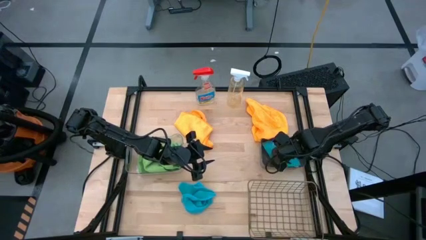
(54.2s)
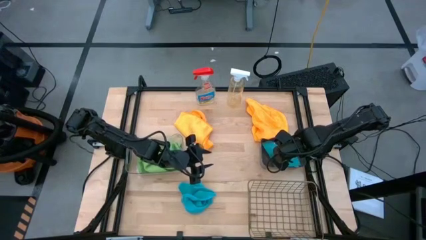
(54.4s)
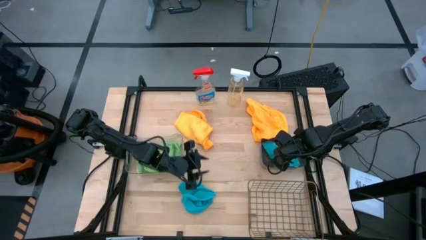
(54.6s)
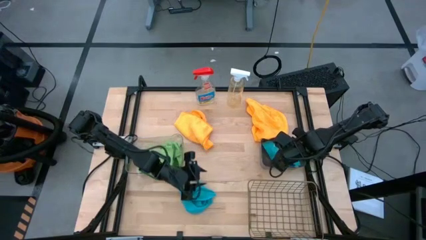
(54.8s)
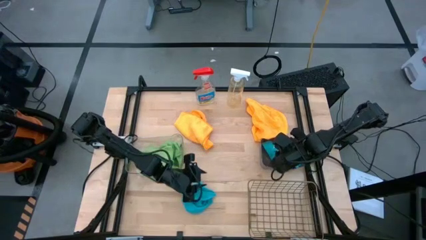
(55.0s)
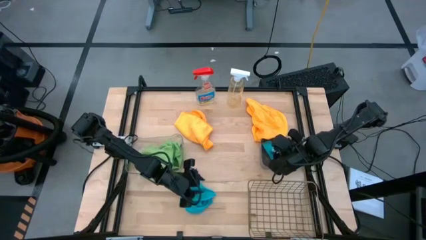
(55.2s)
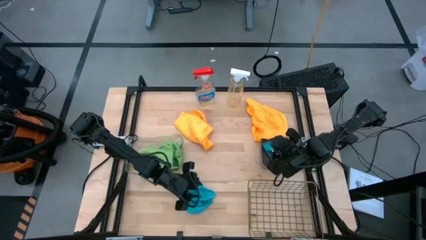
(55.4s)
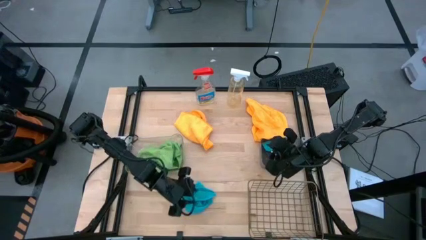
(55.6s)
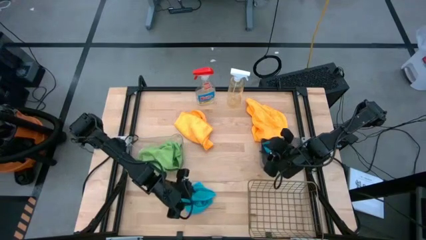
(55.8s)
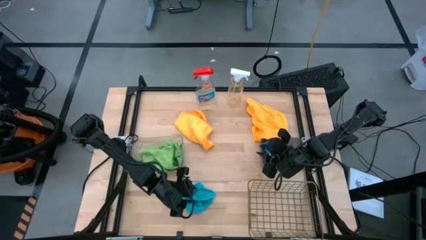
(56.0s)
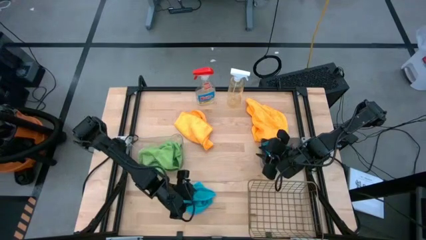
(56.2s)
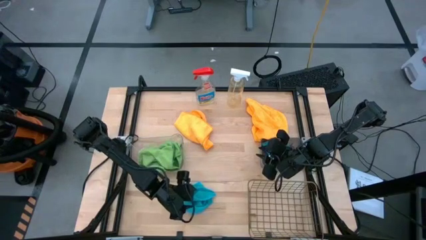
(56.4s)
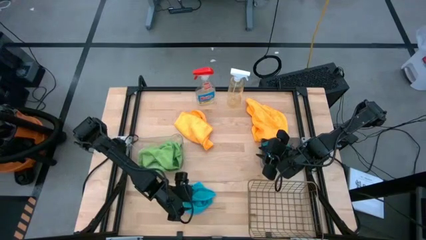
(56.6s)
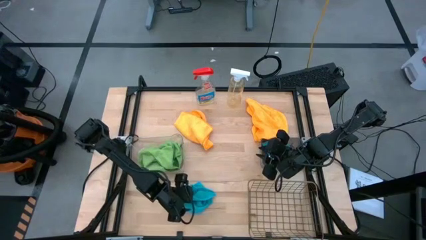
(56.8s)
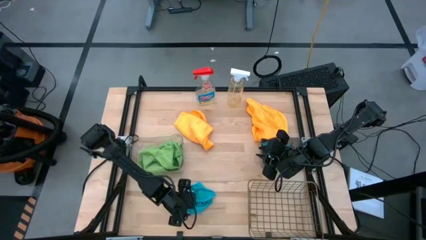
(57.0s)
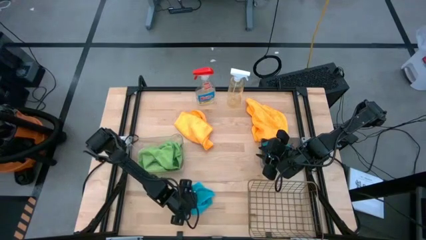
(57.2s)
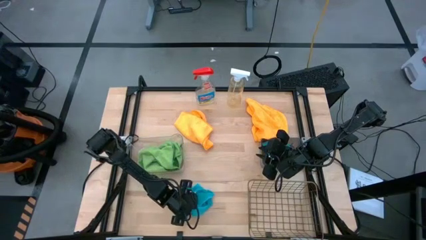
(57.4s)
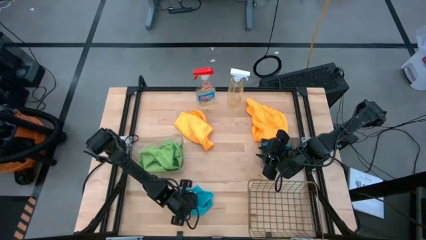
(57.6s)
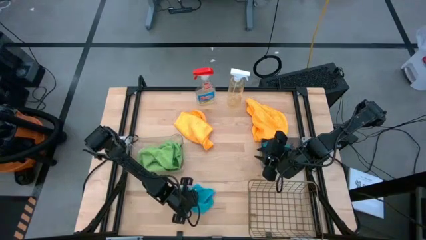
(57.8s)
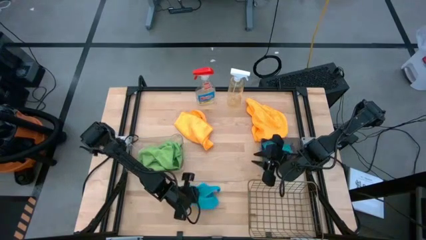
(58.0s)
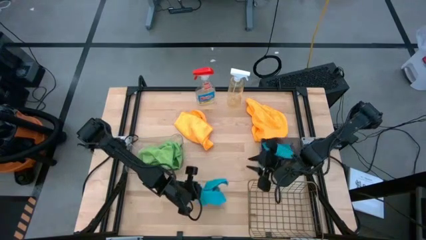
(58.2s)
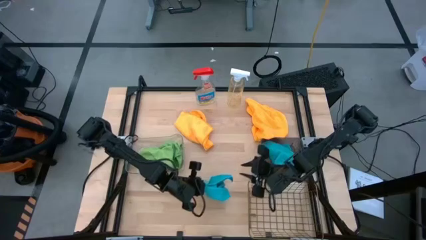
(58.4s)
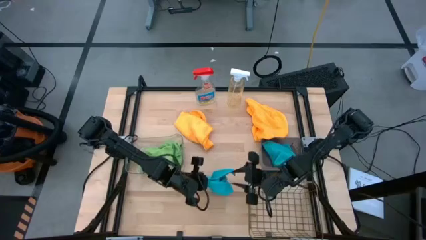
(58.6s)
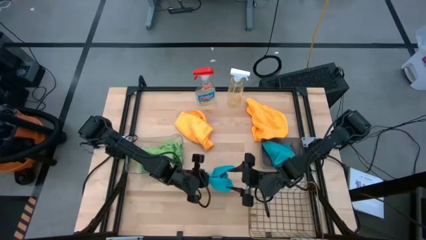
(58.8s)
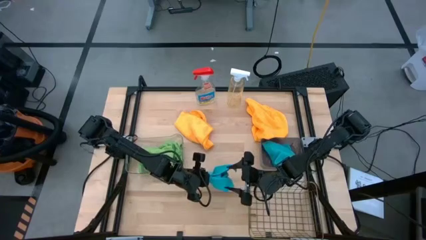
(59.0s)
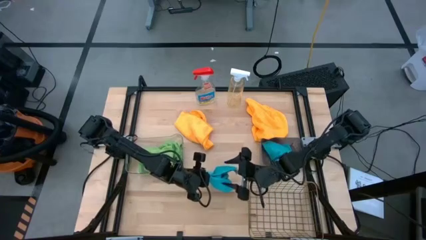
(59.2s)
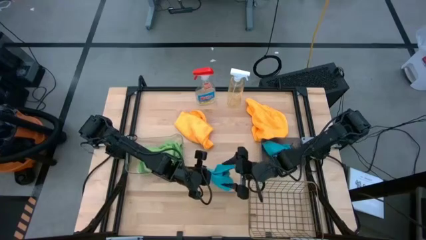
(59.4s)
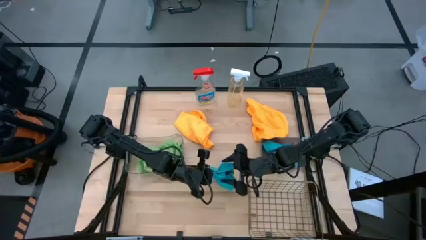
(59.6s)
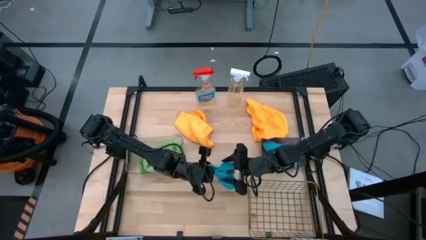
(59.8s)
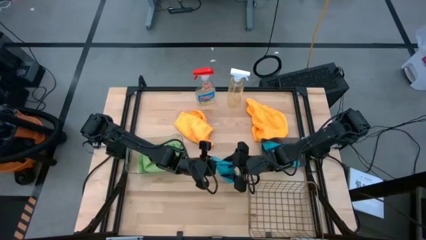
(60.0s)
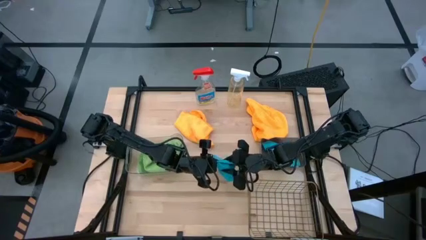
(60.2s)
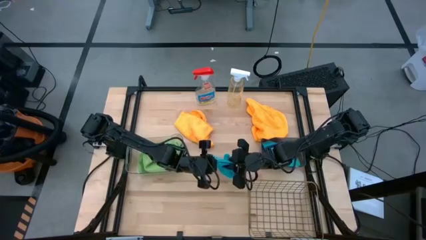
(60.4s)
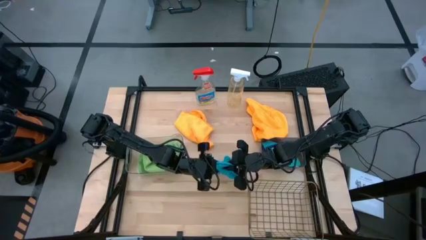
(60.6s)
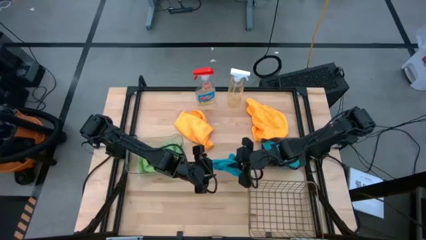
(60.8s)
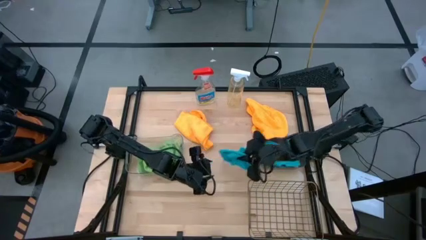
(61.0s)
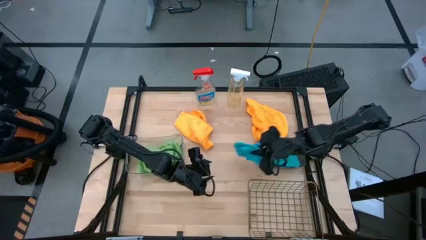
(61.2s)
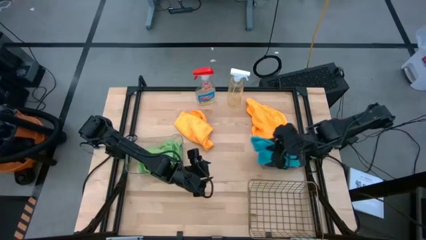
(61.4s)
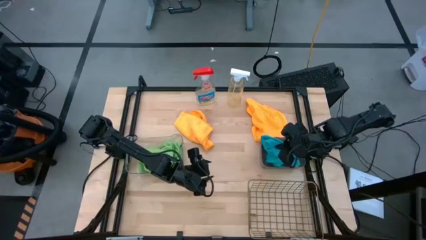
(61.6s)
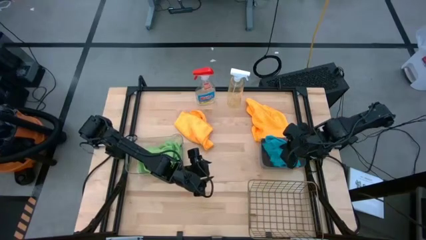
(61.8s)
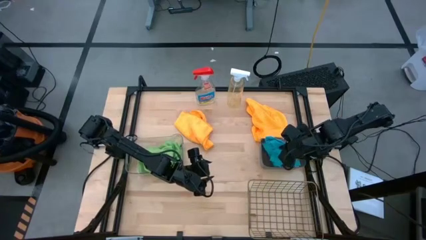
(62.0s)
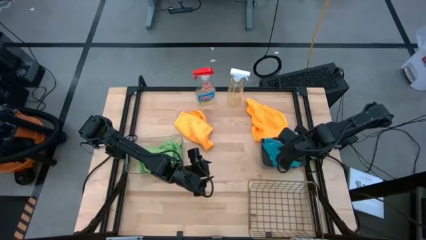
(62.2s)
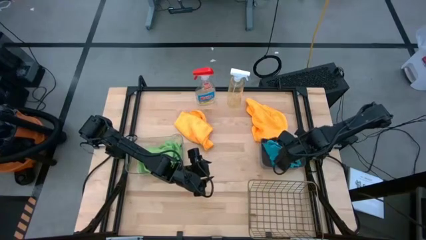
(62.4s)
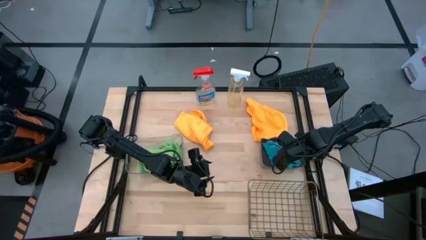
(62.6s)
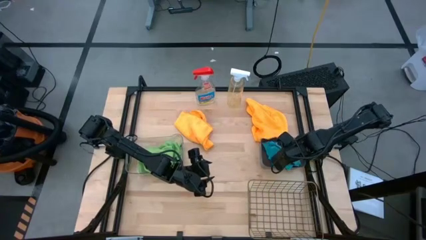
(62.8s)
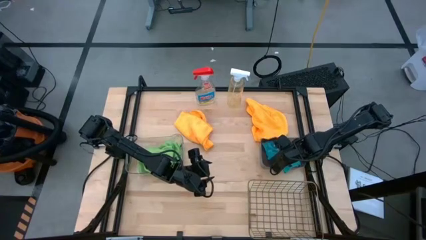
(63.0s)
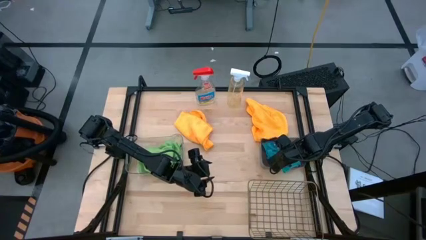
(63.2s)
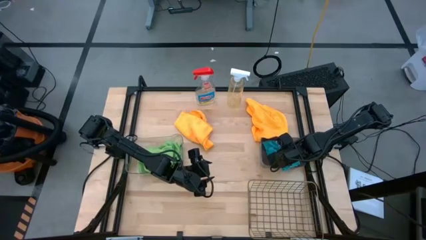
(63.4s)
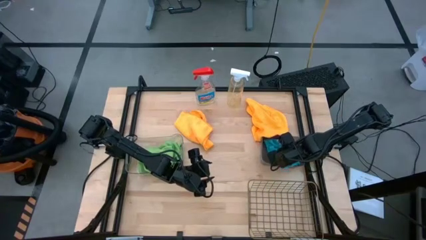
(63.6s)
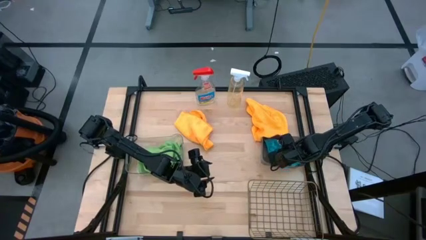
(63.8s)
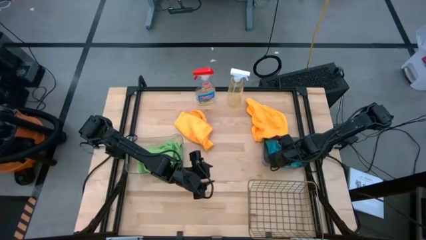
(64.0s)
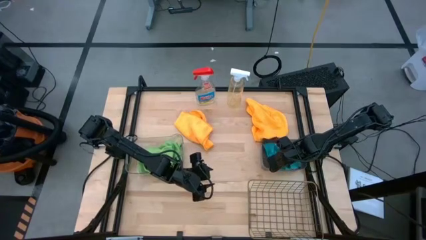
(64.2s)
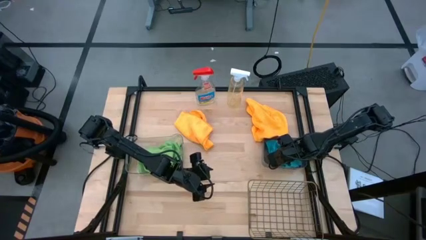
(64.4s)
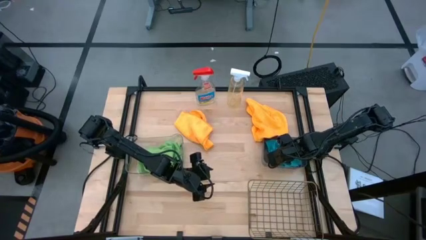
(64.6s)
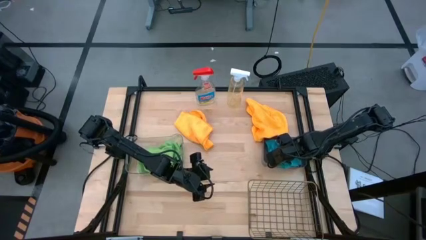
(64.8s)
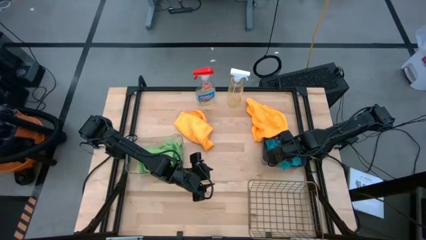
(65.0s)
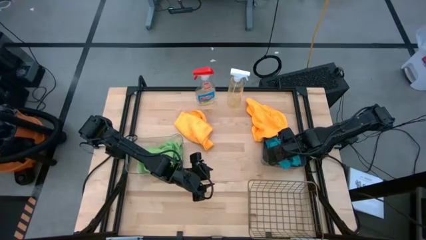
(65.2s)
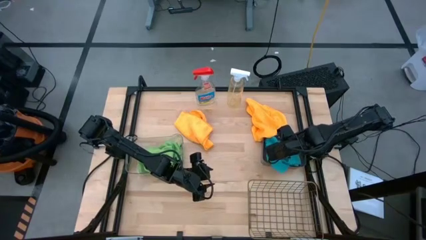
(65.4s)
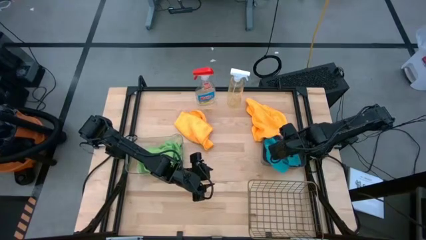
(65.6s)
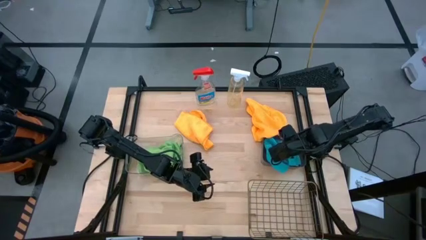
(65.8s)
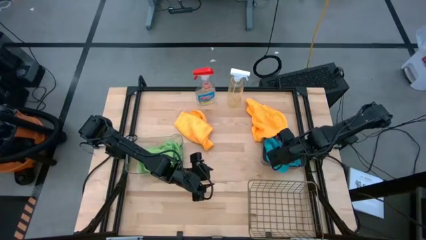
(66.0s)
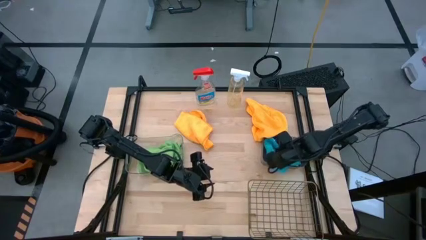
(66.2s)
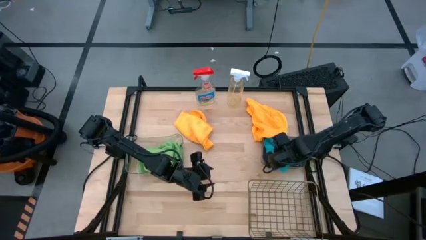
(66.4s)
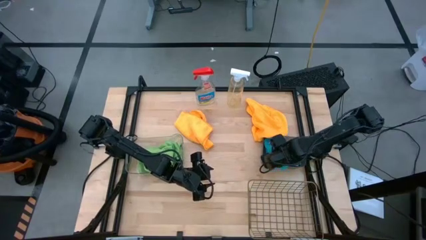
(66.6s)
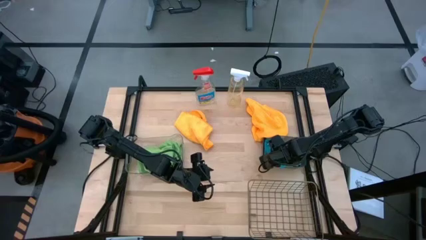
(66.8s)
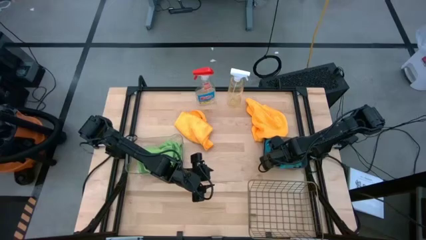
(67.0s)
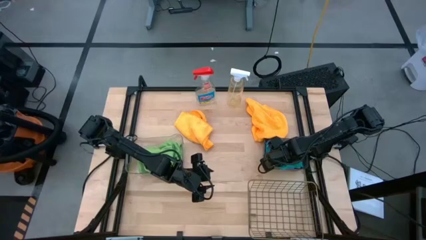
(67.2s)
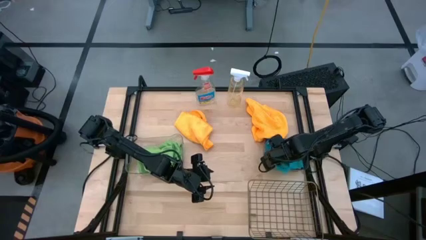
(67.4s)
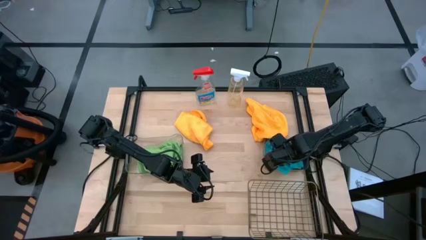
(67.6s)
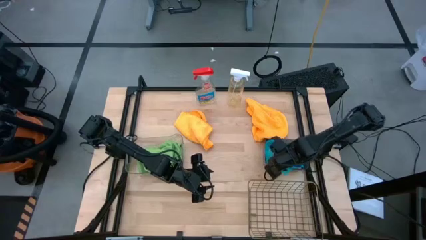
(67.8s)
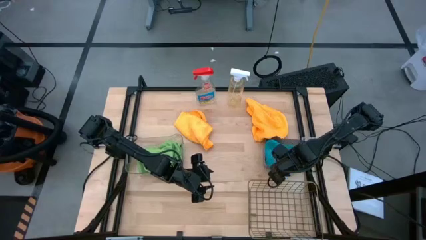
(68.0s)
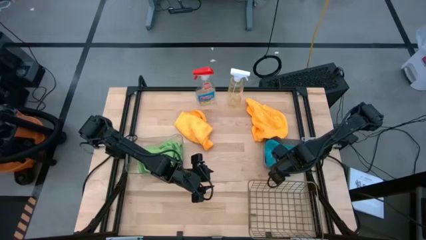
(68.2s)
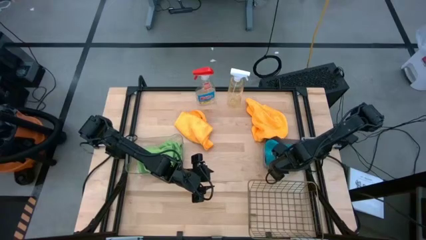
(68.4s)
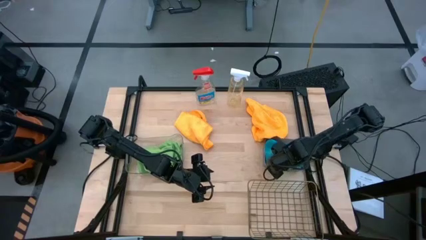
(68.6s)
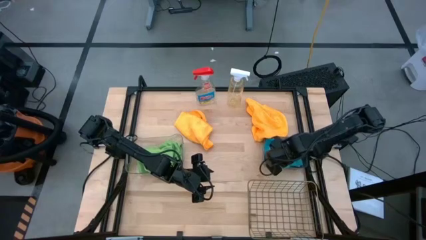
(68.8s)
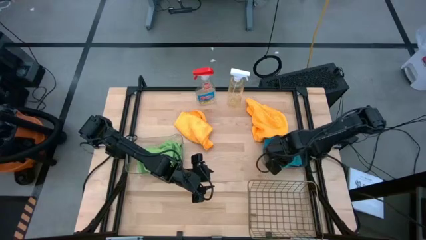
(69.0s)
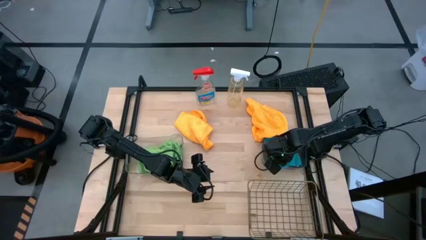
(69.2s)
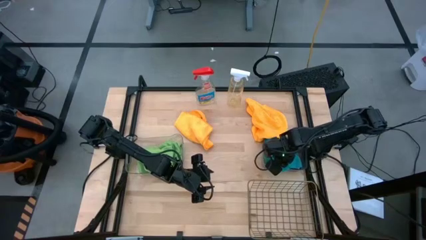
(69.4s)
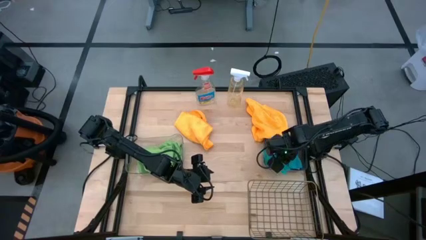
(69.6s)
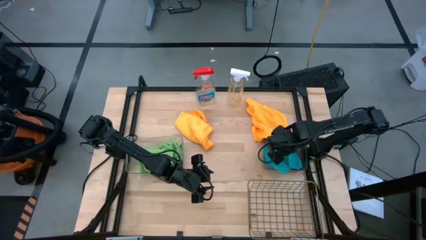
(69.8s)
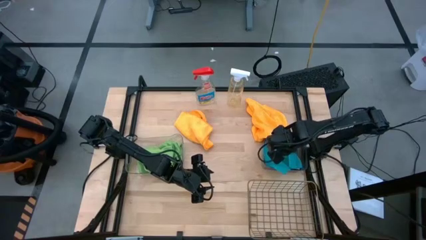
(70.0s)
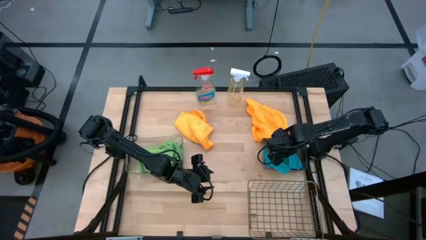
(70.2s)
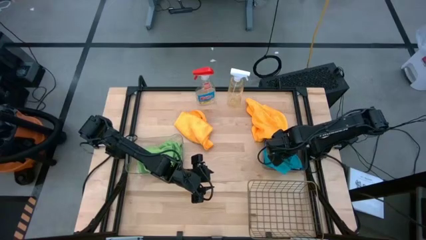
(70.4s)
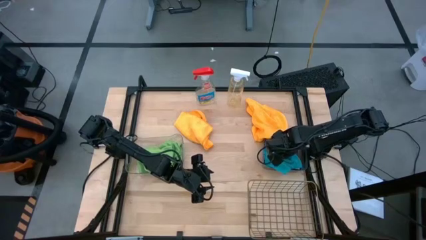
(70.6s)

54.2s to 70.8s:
Task: Sort microfiber towel by color & place in baskets
Put the blue microfiber cloth into the black bin
